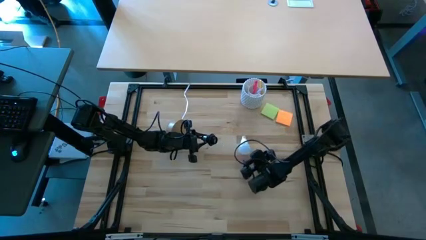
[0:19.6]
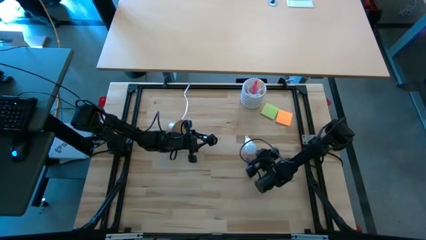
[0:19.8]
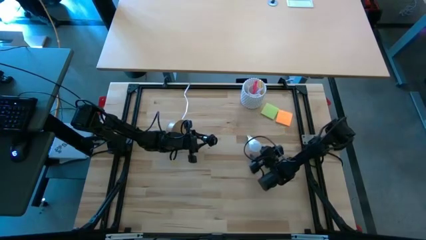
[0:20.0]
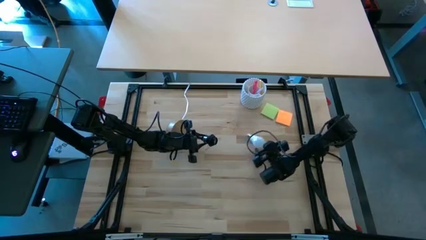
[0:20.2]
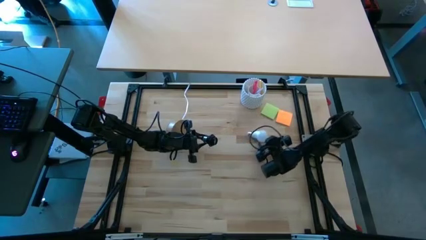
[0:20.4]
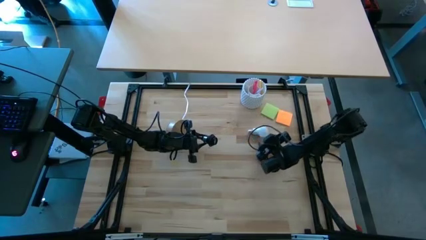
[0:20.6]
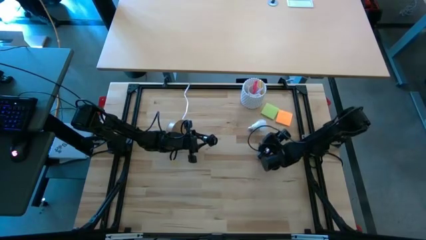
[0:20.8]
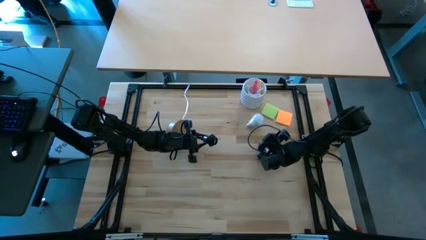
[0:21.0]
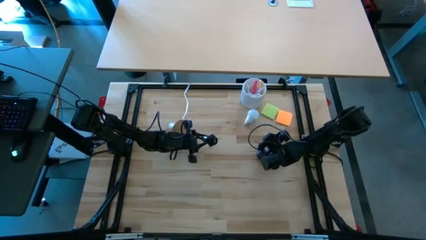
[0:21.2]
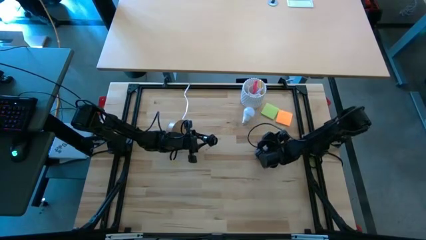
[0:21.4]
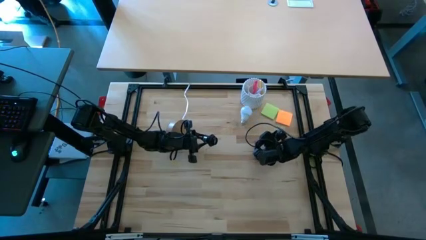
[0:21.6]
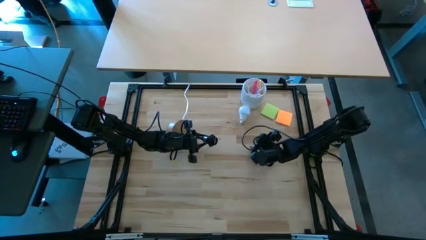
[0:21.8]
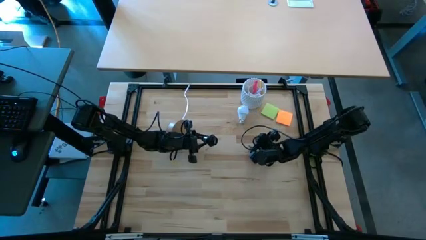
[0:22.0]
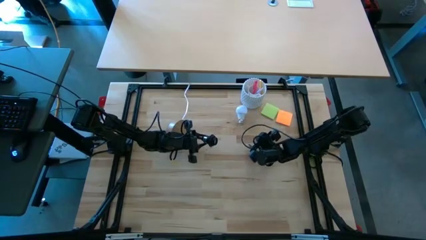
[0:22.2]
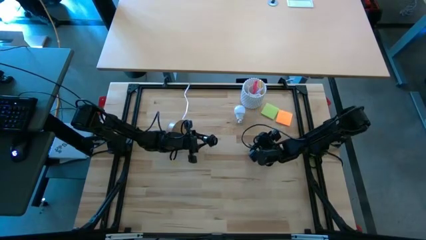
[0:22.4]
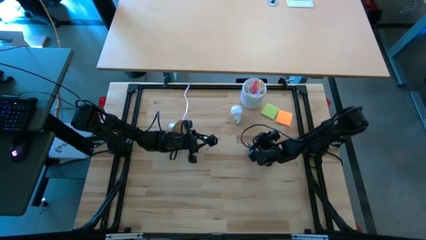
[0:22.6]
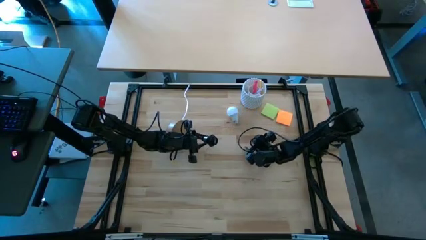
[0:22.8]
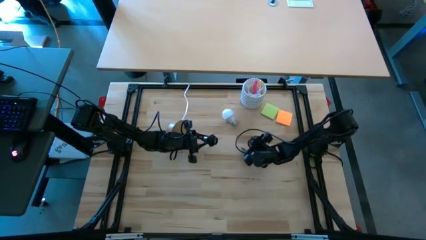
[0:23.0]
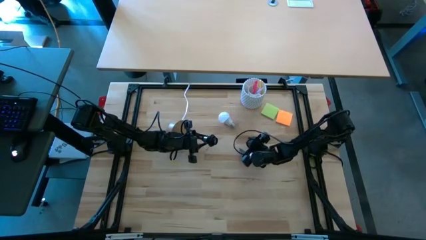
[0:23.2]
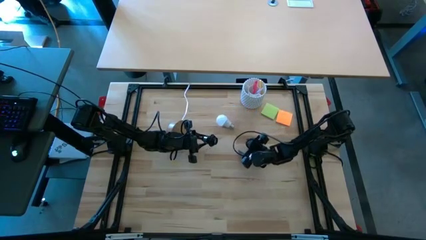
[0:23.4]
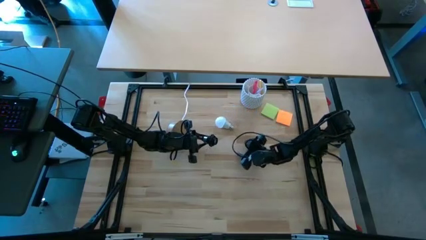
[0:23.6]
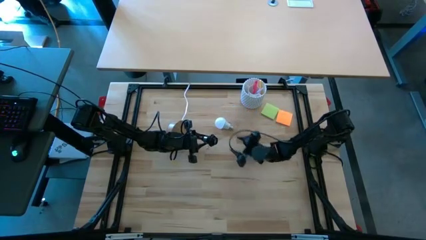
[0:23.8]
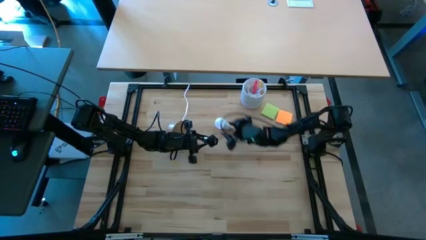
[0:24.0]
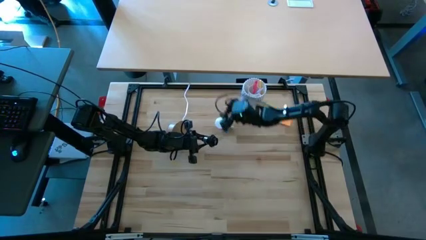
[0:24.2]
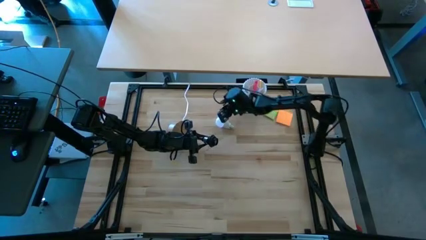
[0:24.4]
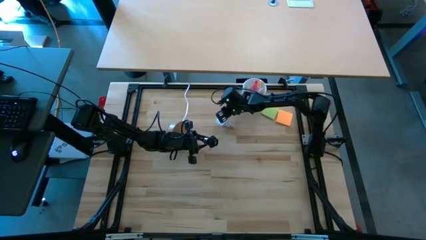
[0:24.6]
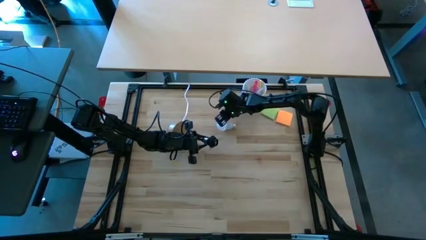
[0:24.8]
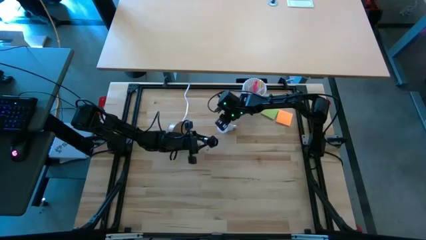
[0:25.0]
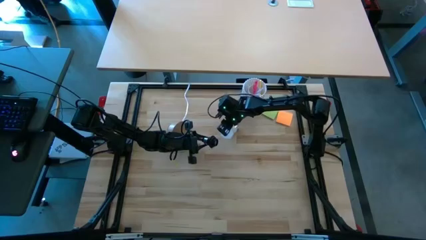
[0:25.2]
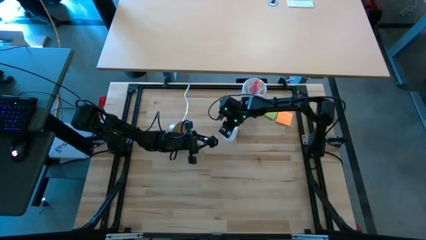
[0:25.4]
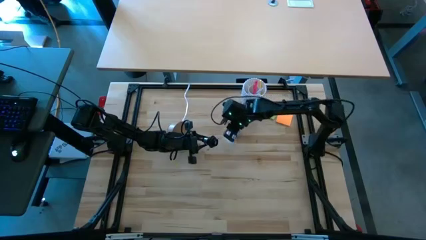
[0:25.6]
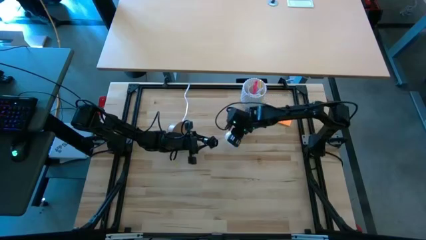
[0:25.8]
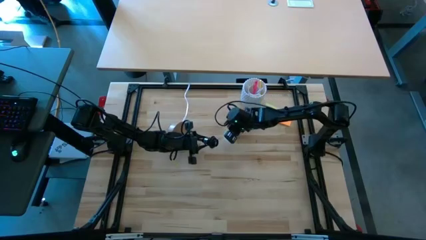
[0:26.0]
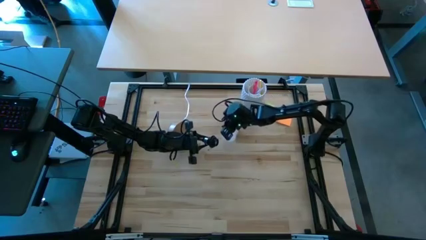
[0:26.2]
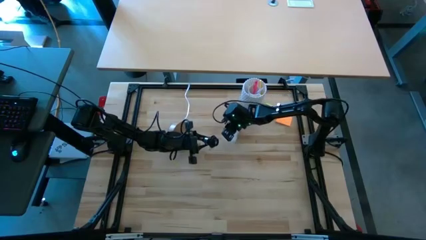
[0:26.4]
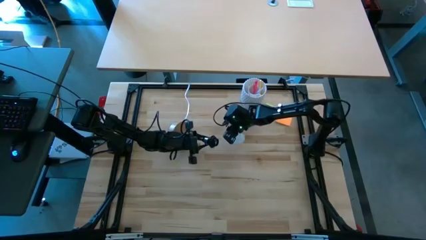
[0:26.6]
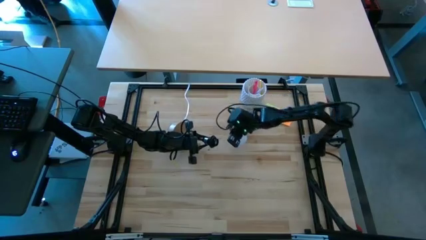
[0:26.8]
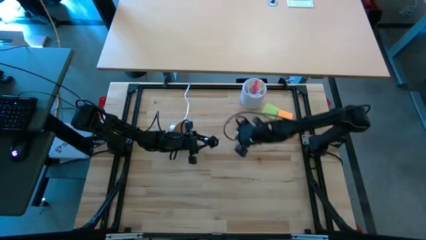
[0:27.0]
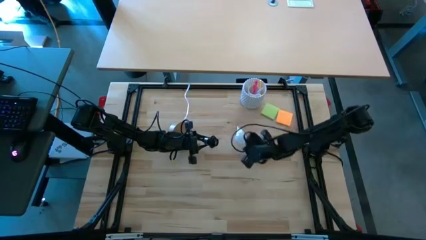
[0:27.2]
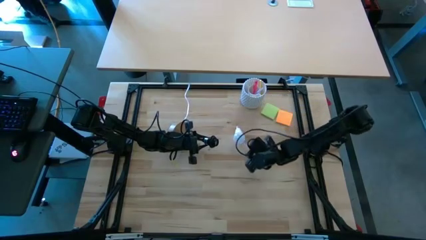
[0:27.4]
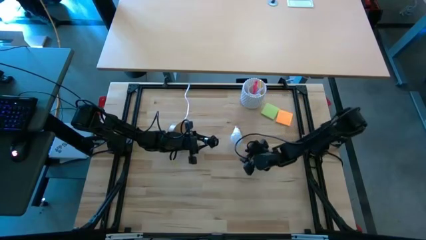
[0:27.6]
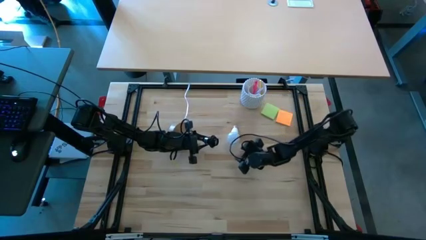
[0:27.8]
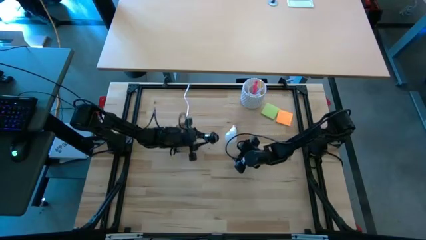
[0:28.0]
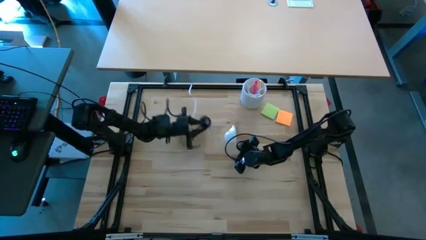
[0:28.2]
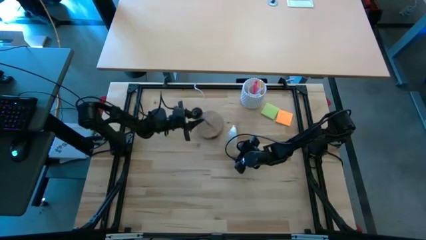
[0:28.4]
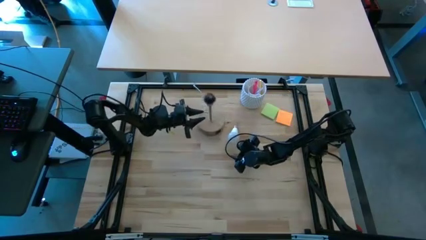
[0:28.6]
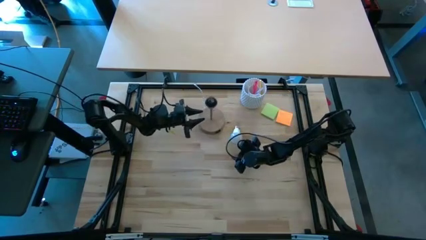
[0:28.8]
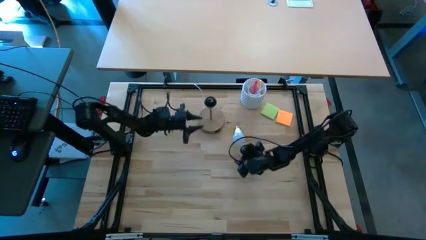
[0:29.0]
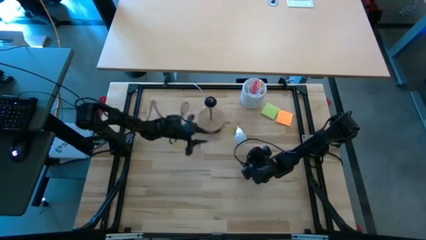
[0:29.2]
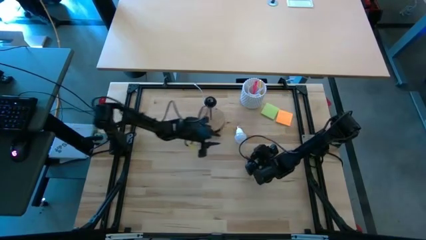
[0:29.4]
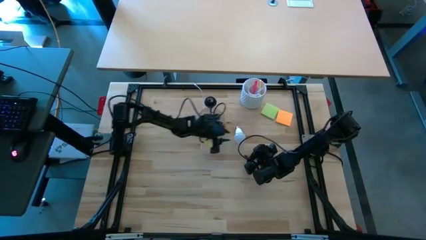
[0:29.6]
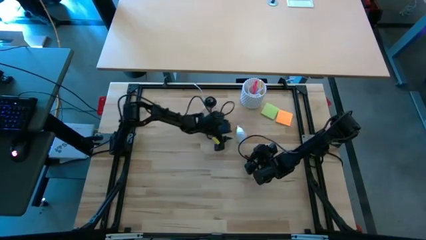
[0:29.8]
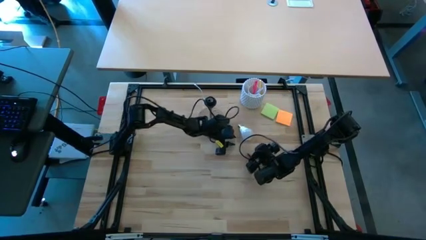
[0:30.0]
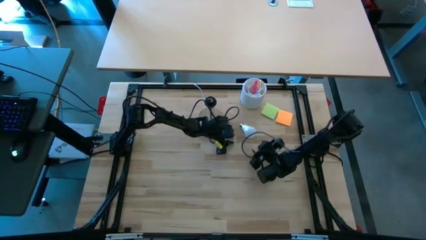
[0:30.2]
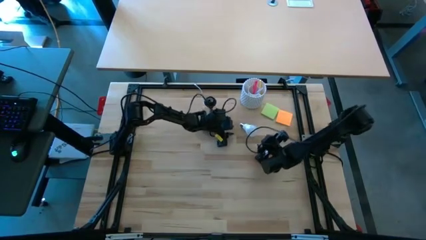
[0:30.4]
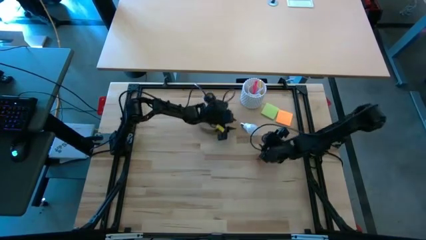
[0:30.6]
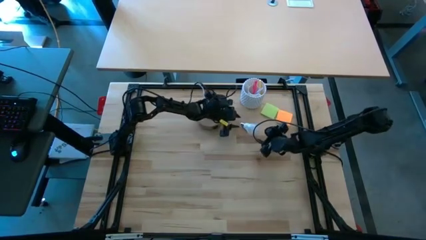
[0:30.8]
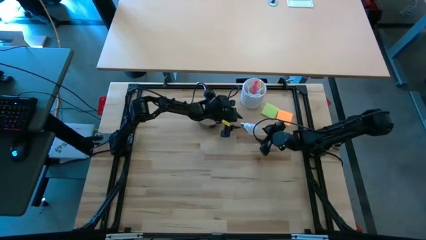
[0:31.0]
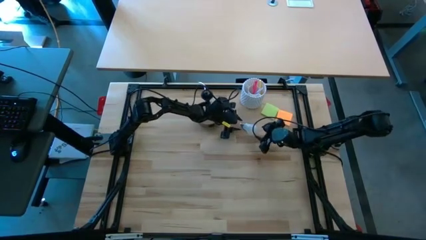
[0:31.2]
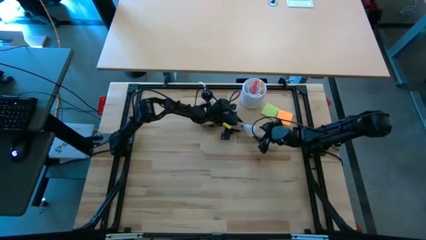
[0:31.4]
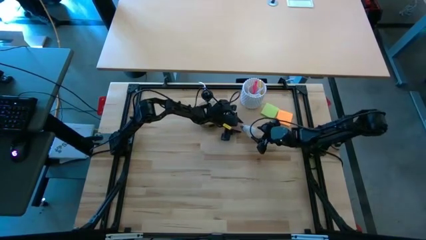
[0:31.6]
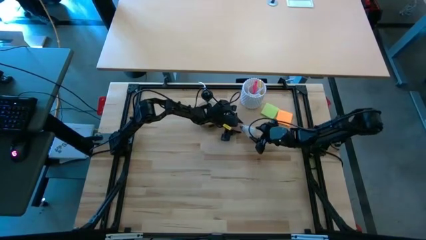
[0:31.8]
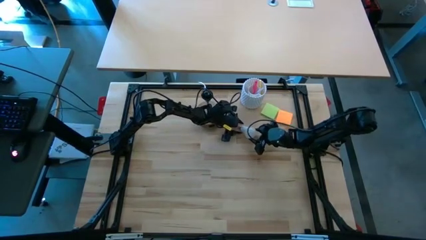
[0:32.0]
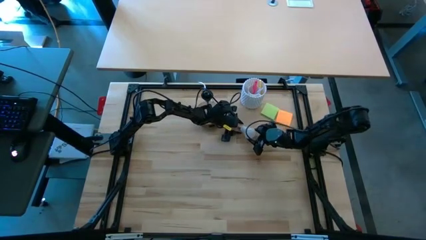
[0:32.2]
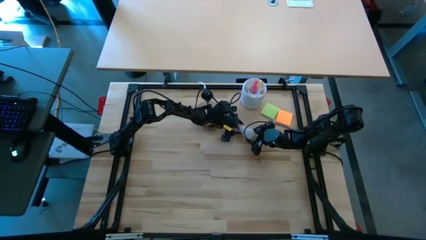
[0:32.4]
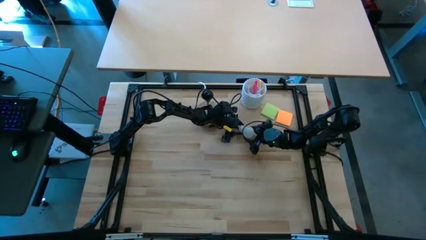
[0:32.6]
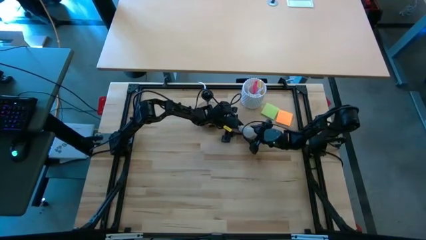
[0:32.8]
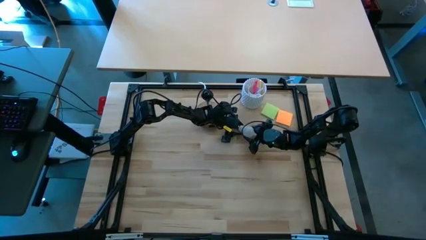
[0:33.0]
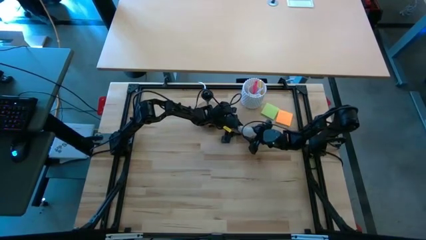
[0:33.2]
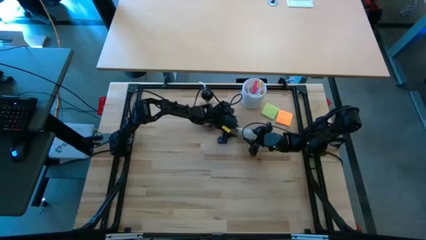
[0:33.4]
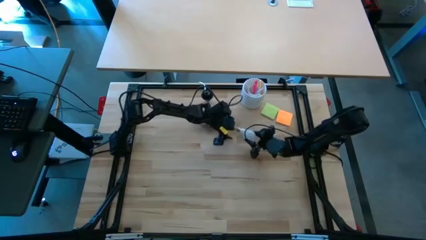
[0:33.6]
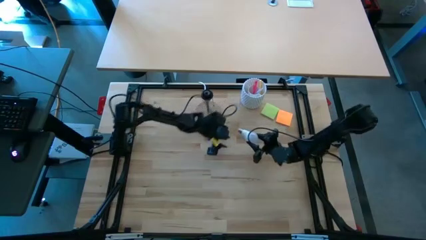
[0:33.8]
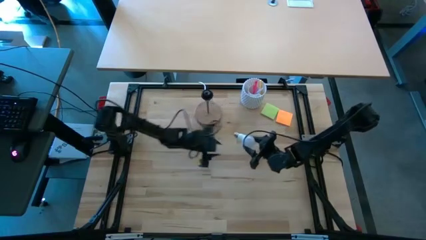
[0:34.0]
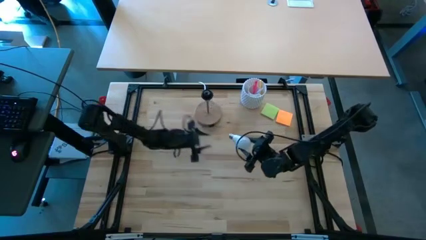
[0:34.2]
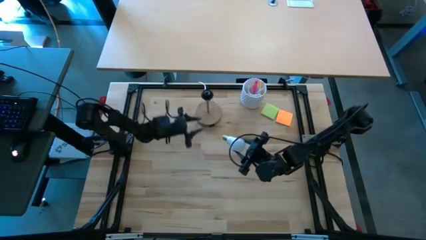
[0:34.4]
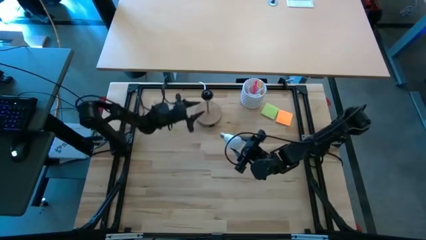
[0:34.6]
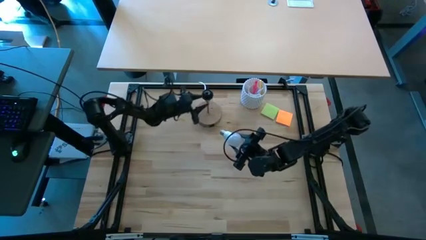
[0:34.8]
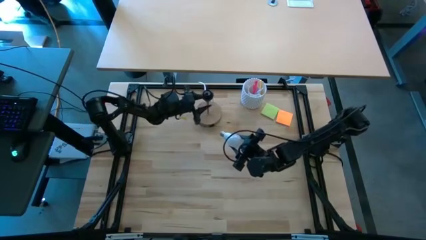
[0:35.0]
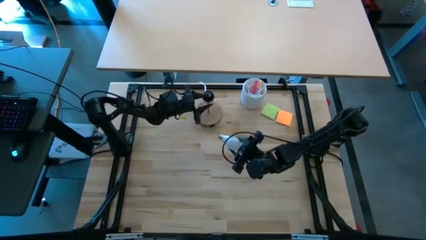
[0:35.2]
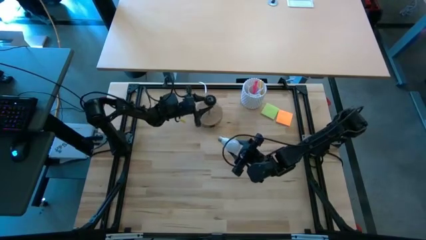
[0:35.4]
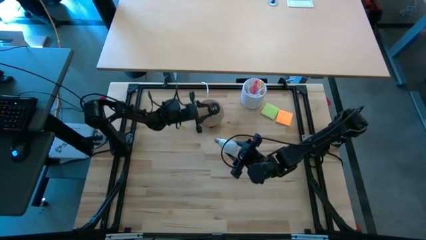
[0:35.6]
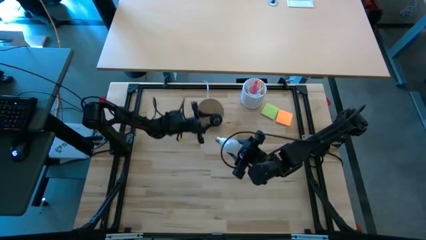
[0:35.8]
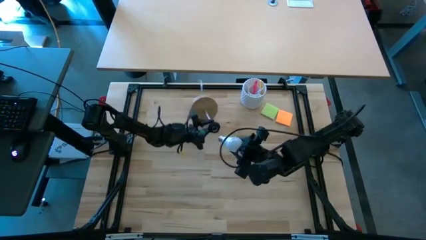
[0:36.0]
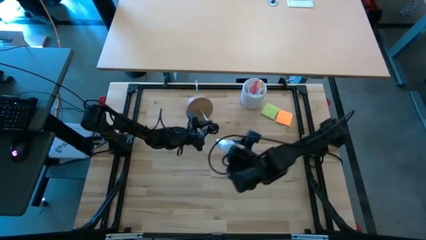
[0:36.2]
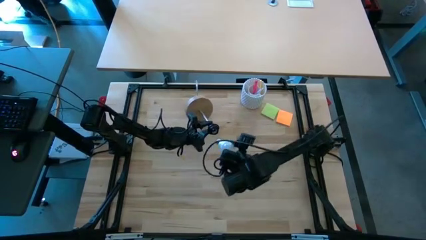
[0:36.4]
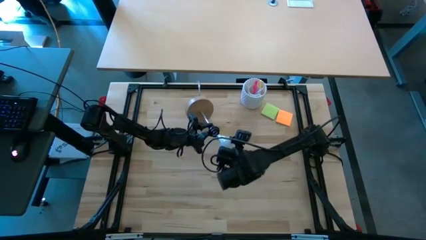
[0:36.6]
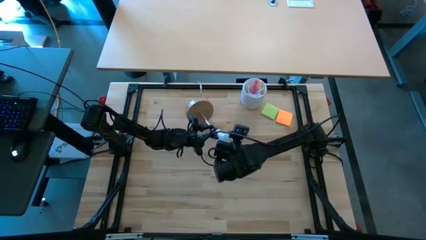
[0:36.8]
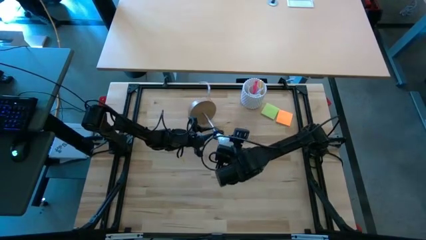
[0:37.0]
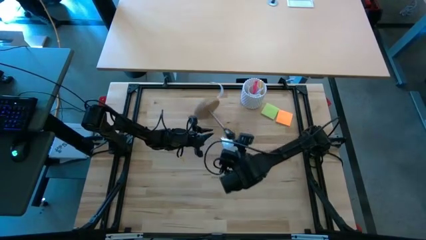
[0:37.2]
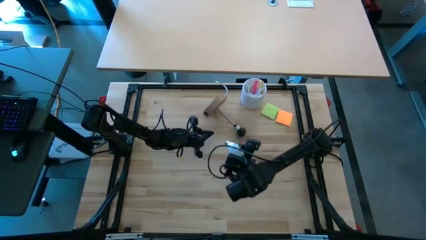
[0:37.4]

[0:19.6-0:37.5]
Task: Screw lightbulb
Insert the white lightbulb into the desk lamp
